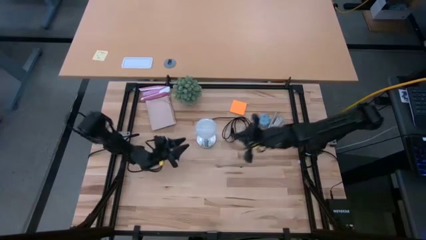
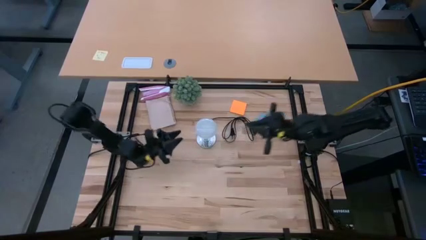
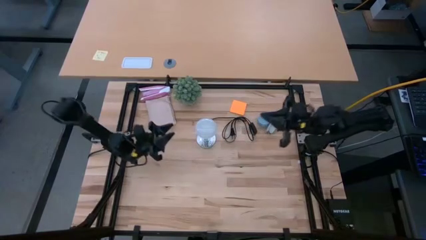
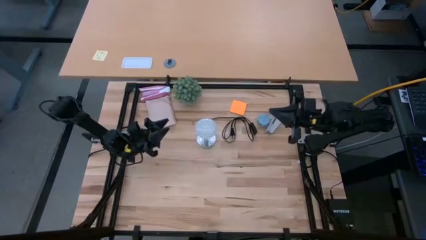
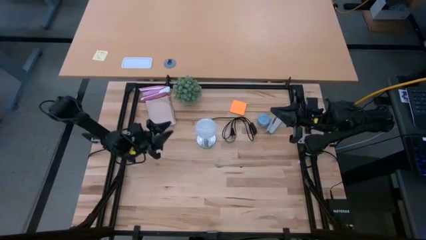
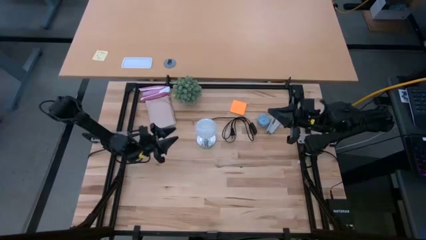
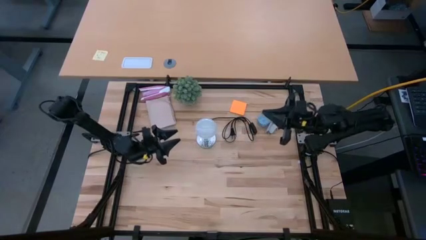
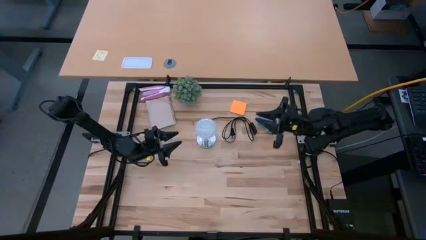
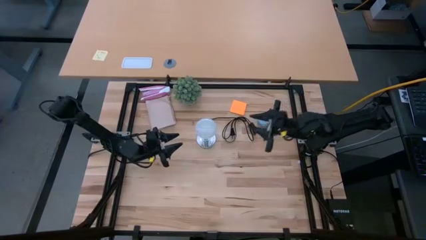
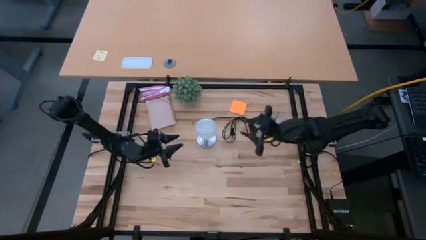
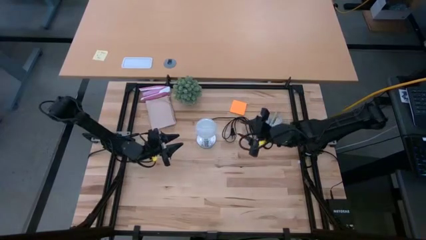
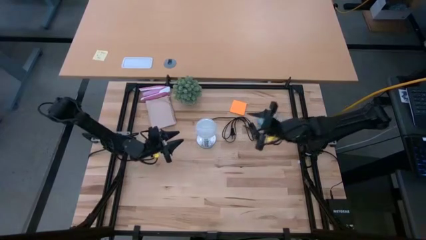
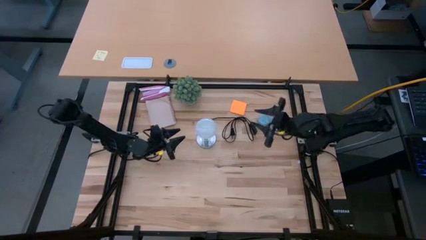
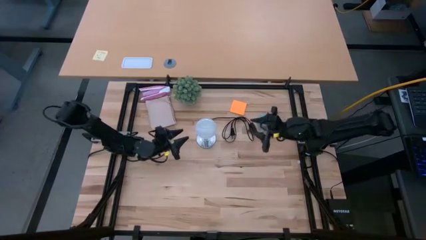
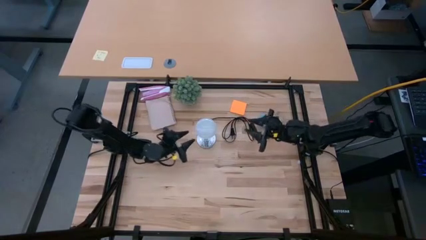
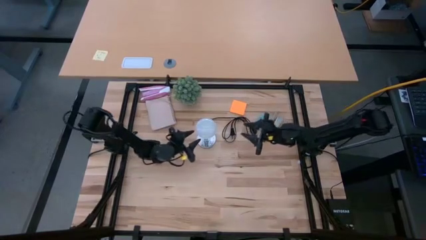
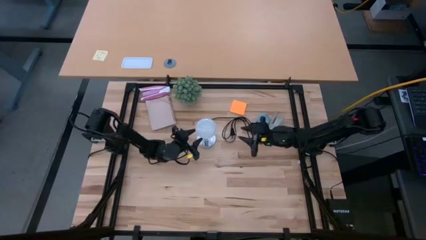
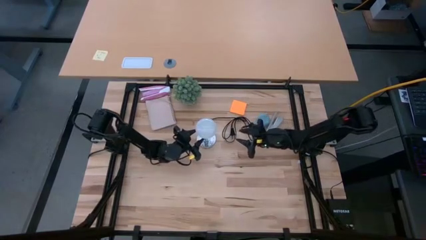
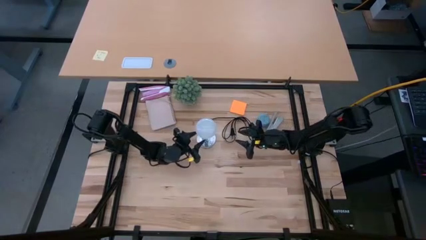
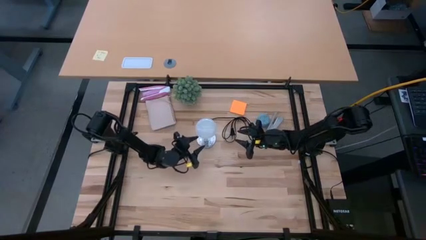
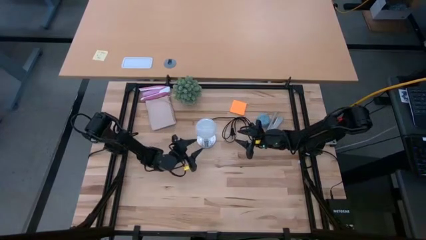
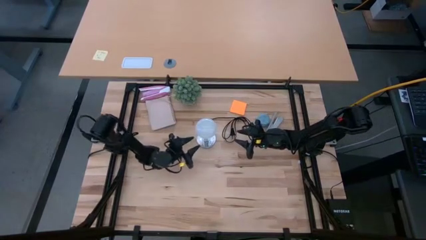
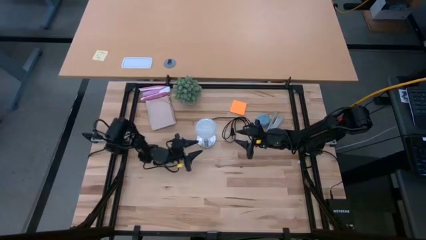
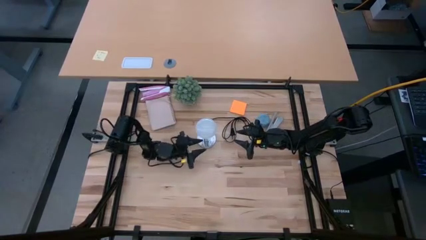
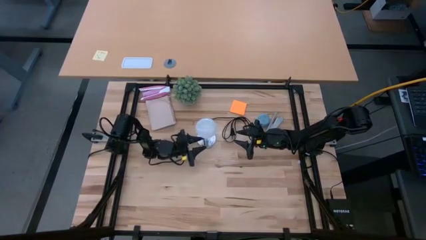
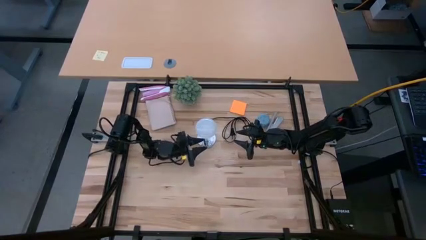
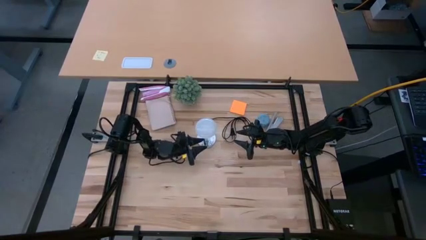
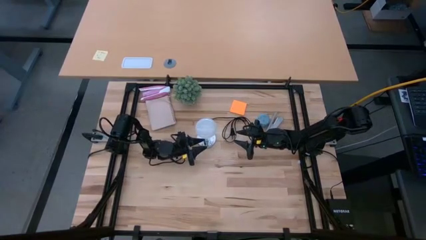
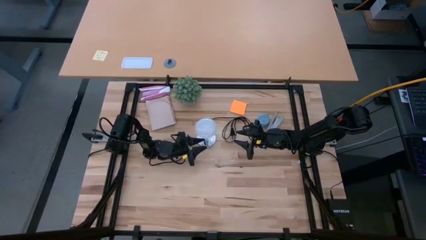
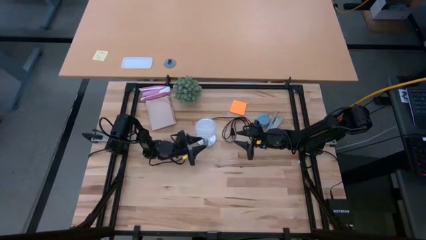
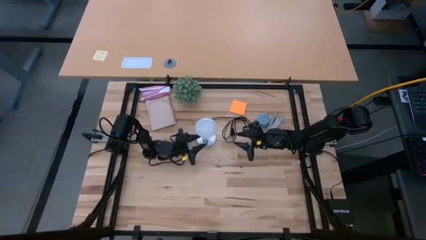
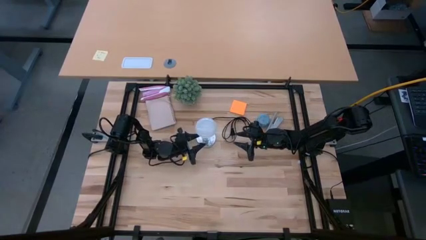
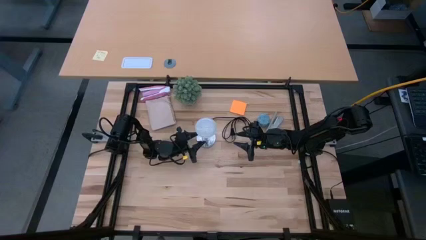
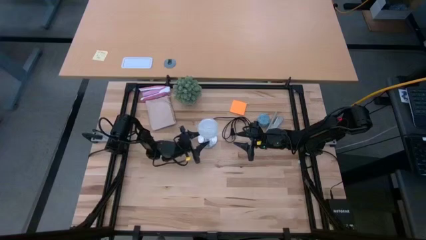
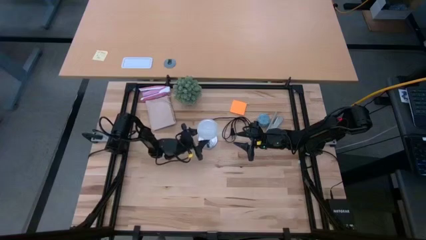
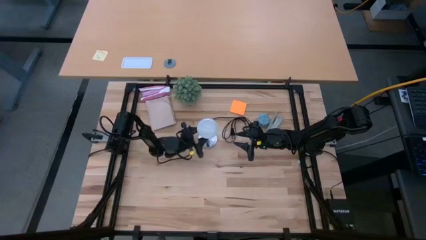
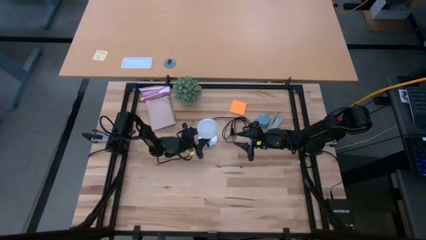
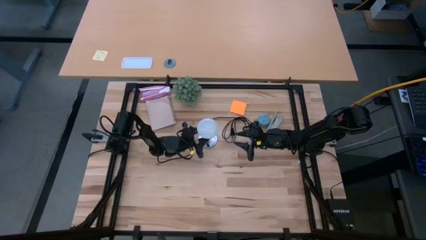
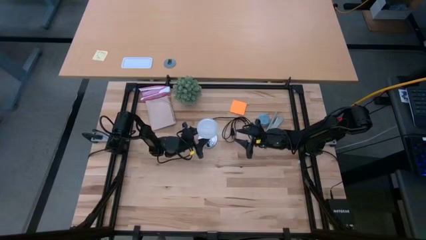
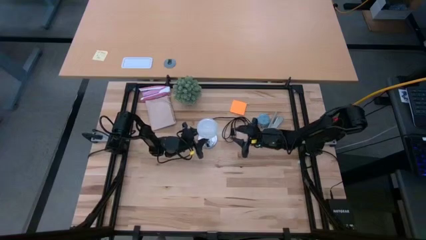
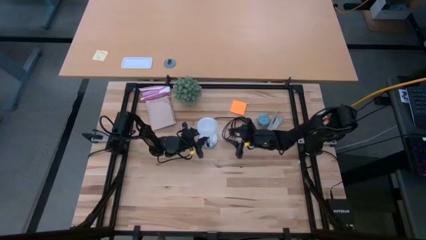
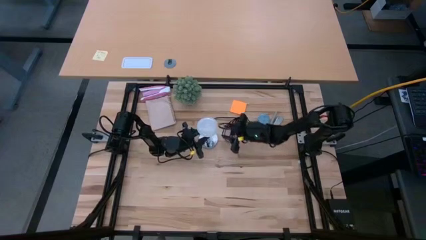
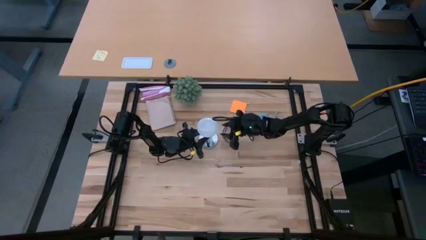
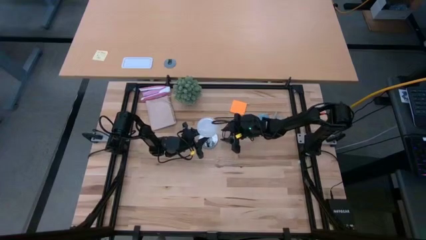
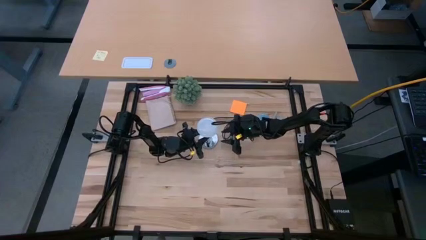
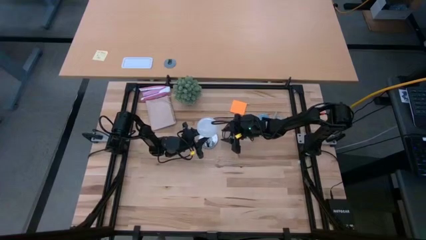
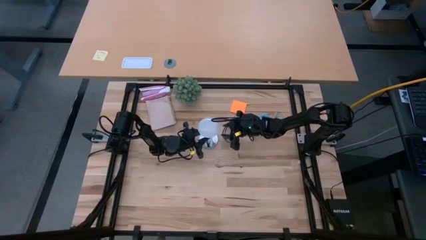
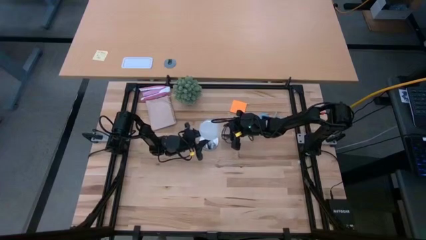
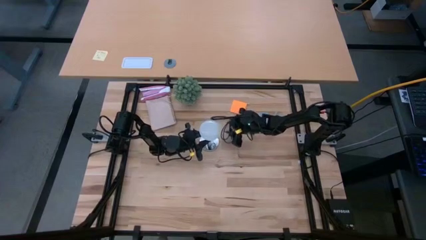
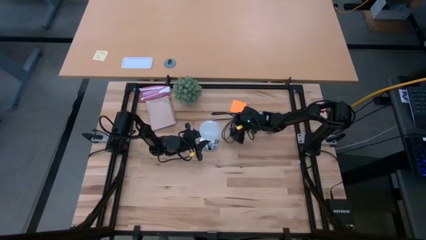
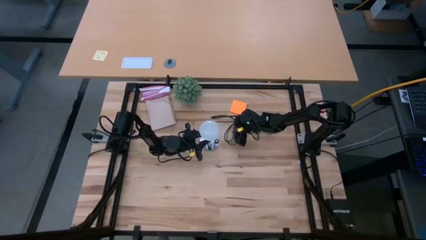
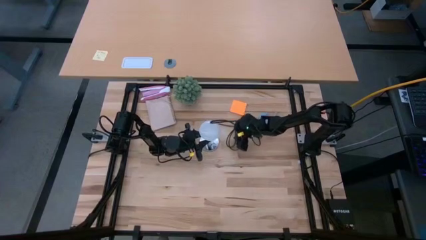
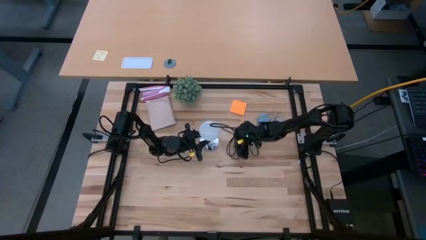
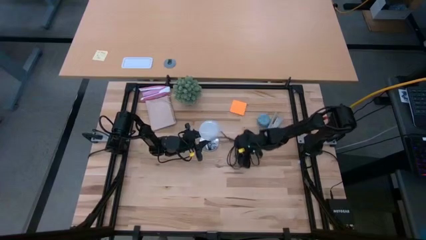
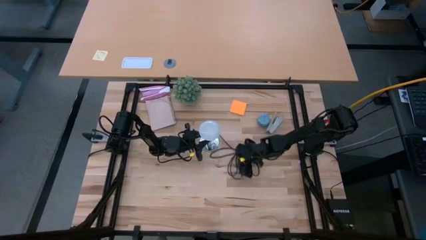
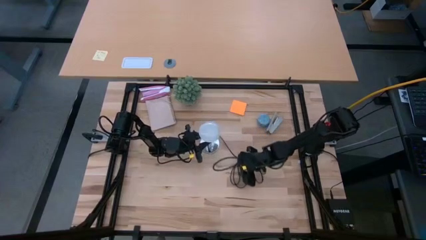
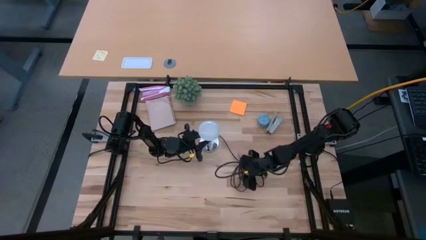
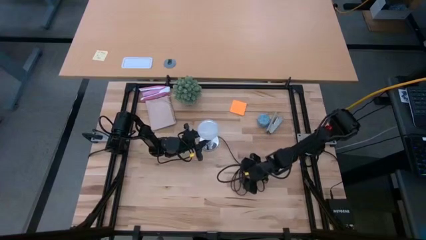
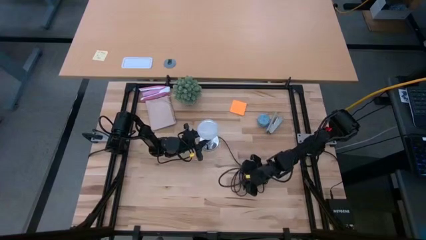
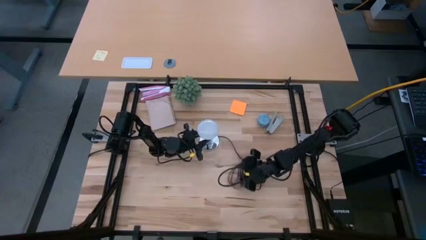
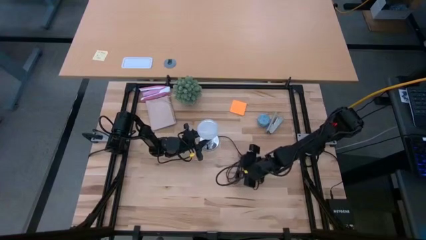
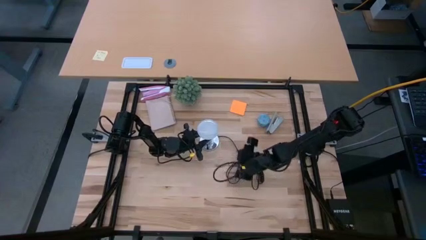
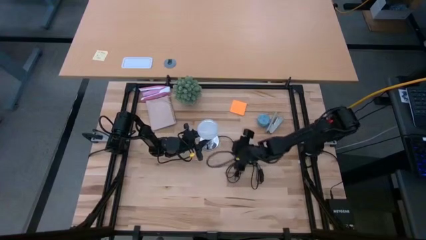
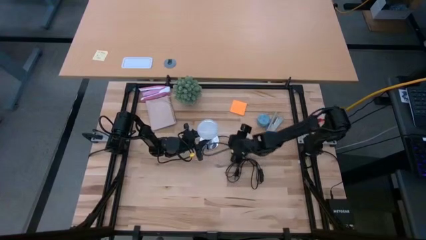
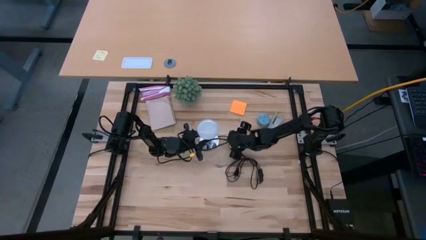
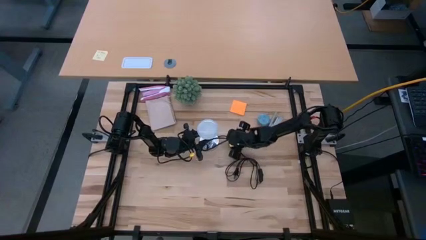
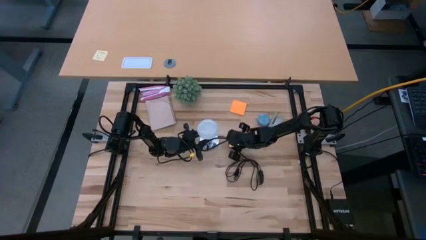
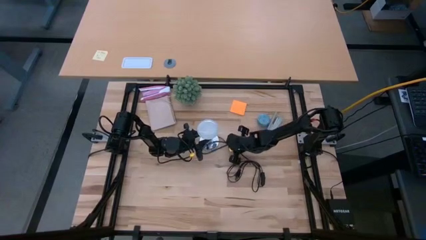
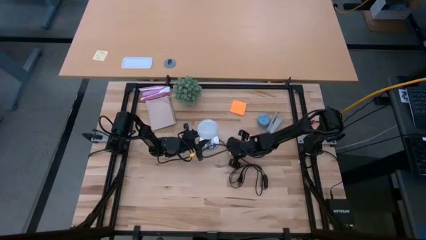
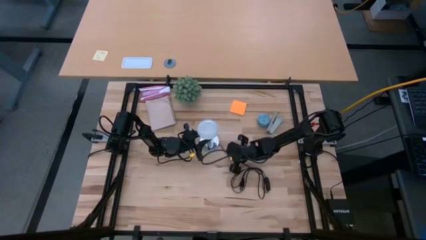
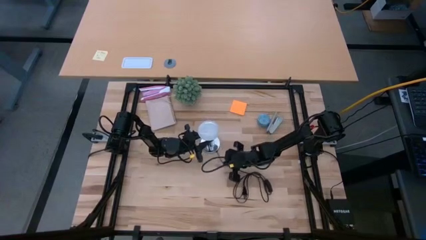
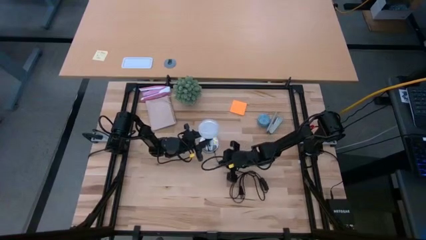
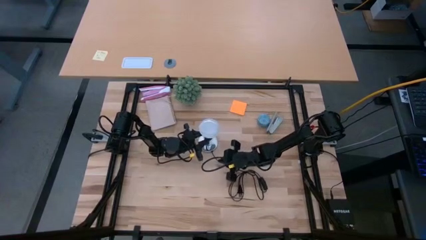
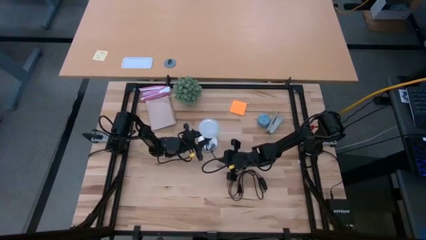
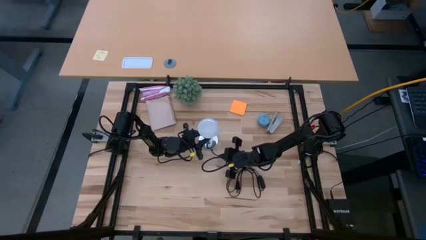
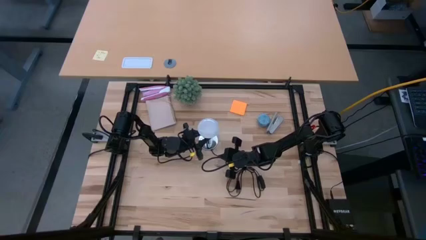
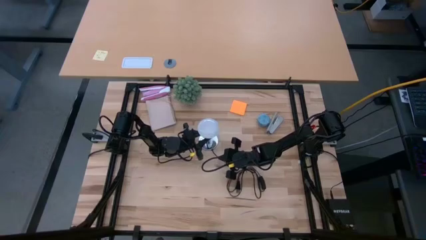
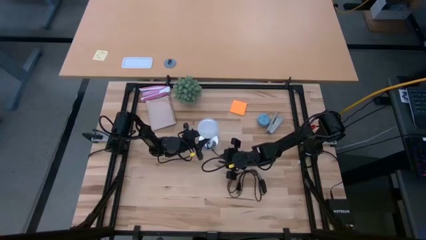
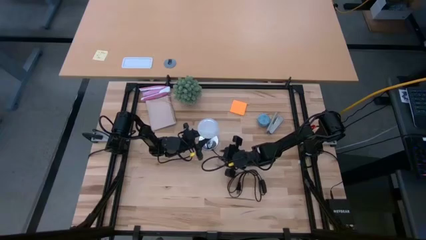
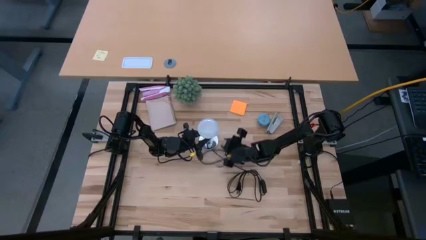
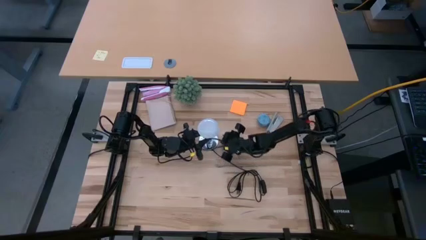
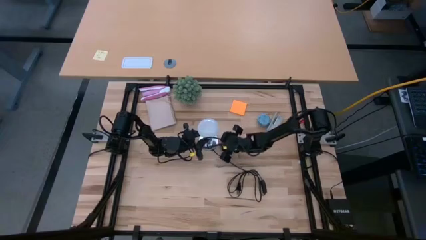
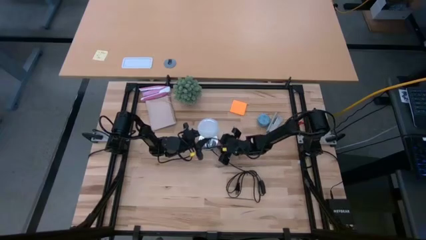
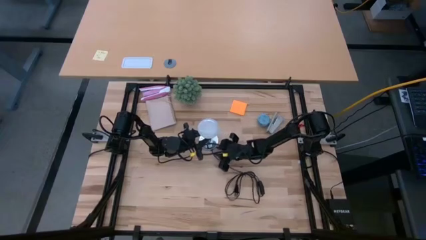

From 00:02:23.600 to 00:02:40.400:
Task: Screw lightbulb
Remove the white lightbulb from the silver lamp

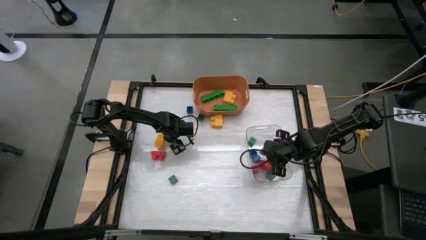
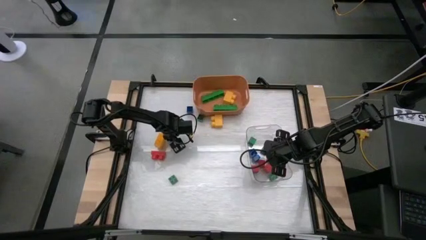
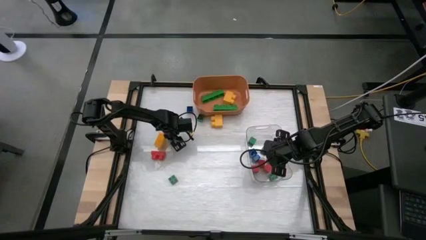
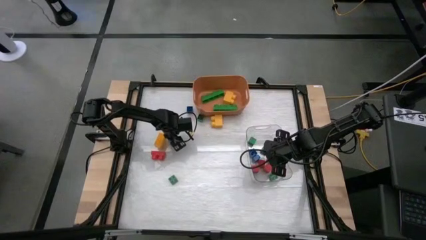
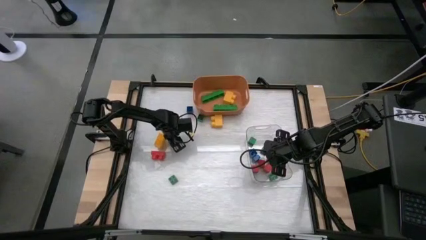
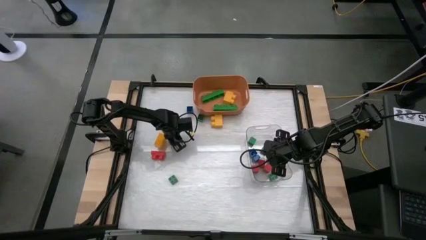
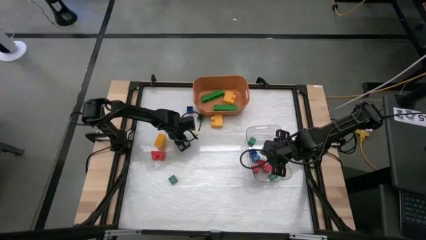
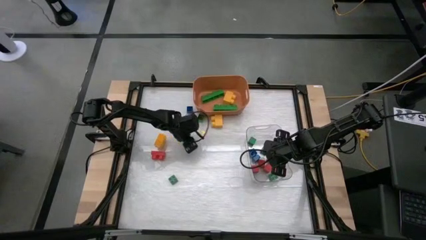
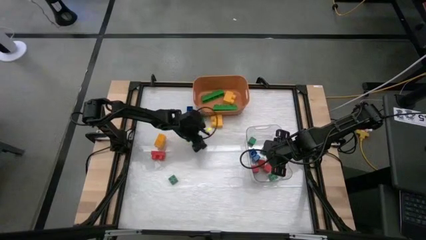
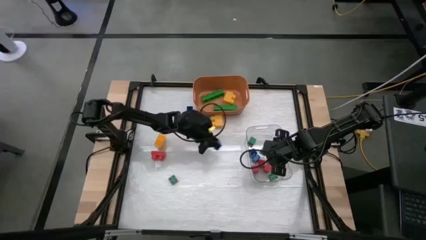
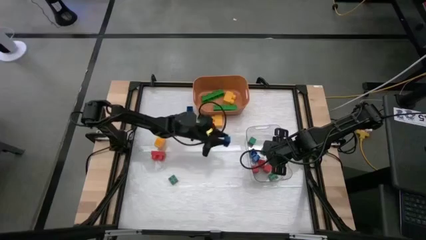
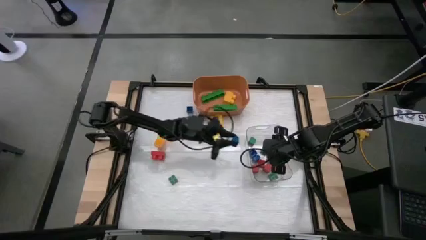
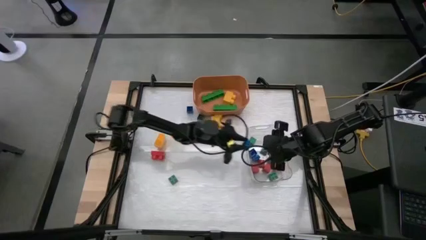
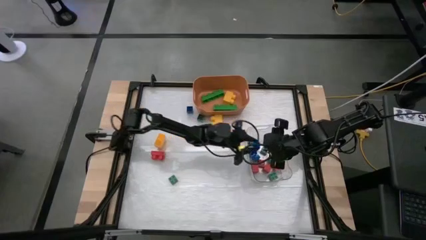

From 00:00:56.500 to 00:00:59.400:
Task: Sort blocks by size
Put the small blue game piece into the transparent bin
